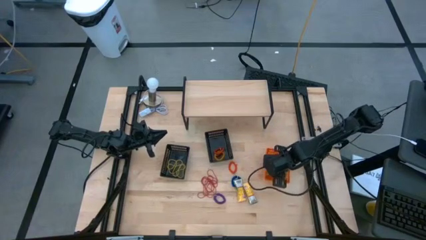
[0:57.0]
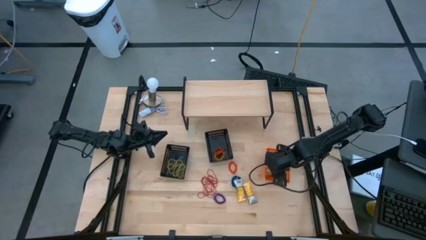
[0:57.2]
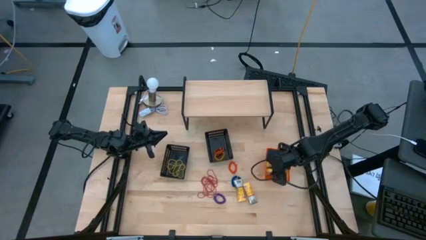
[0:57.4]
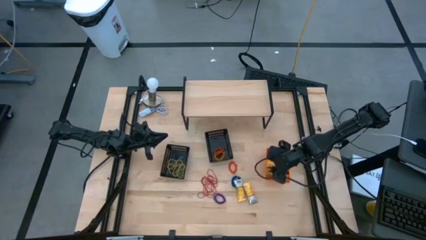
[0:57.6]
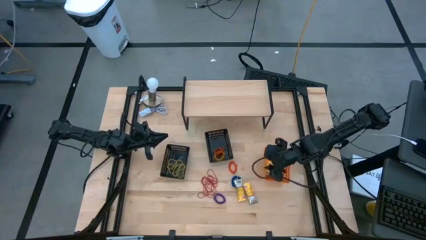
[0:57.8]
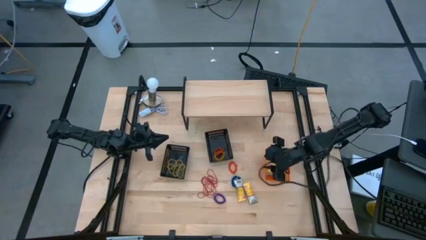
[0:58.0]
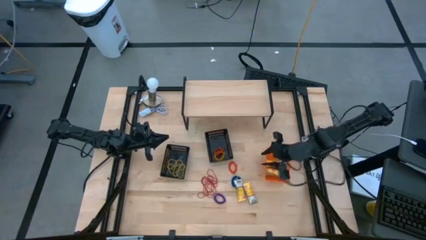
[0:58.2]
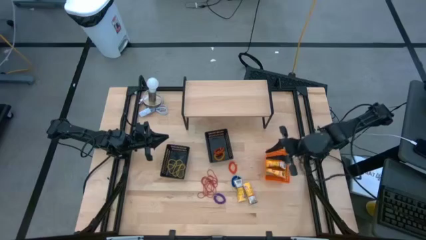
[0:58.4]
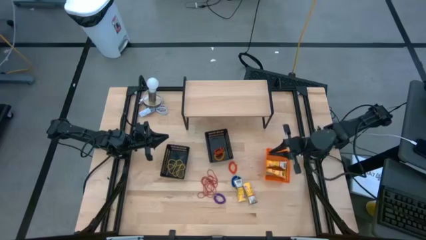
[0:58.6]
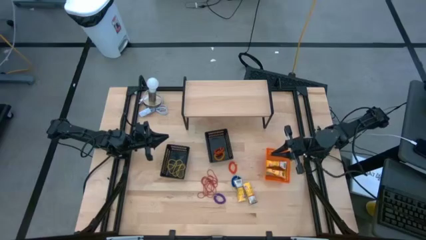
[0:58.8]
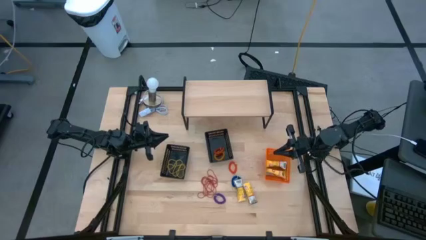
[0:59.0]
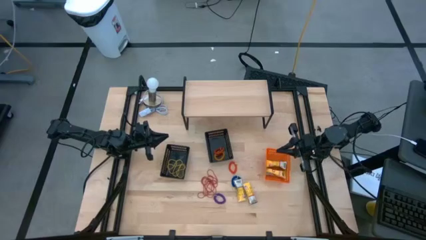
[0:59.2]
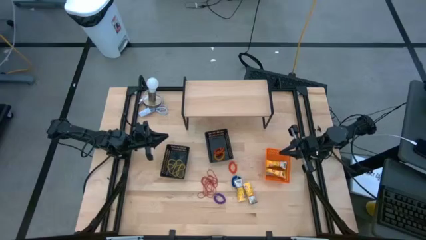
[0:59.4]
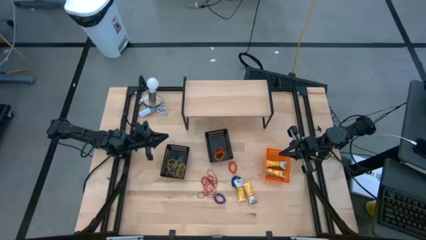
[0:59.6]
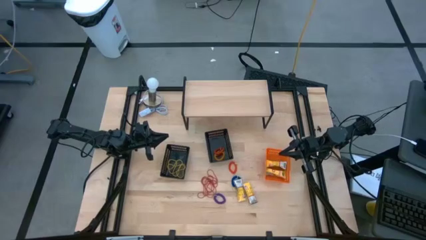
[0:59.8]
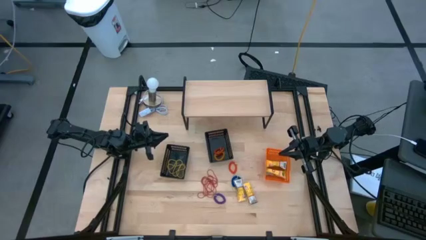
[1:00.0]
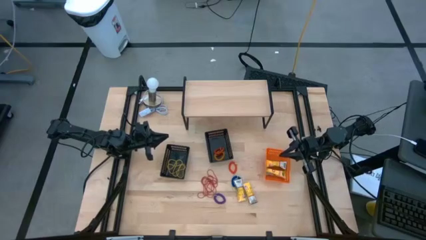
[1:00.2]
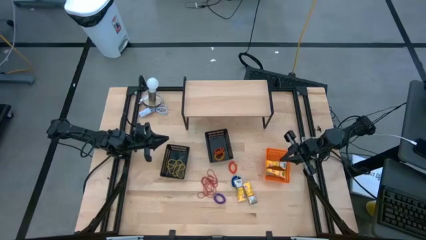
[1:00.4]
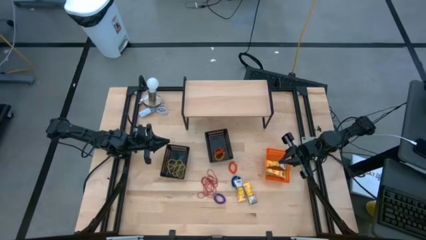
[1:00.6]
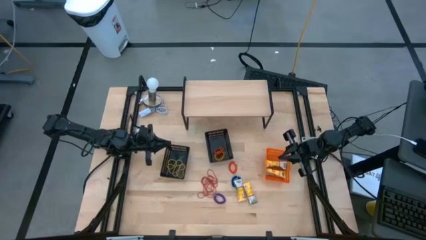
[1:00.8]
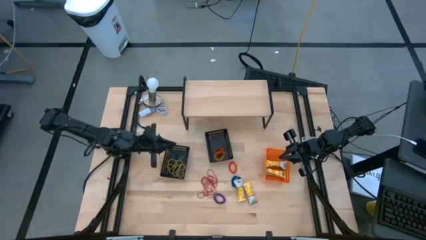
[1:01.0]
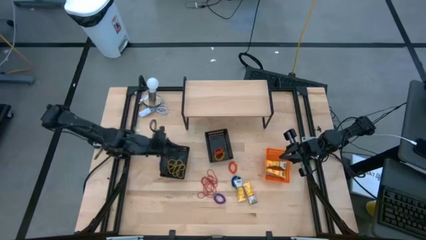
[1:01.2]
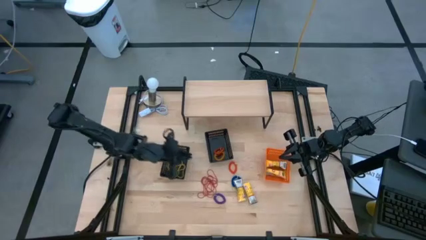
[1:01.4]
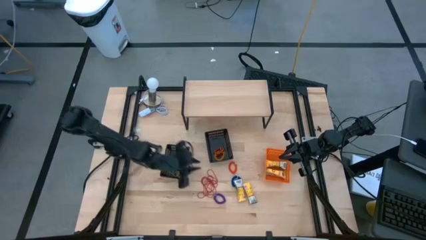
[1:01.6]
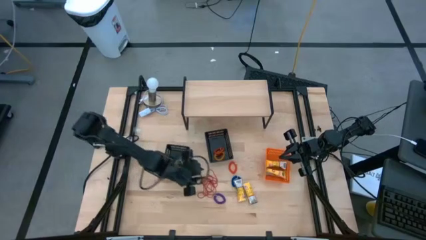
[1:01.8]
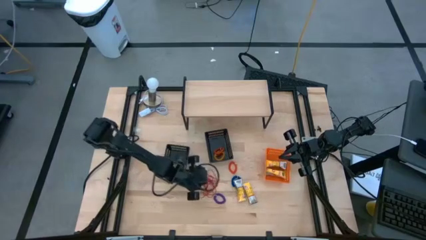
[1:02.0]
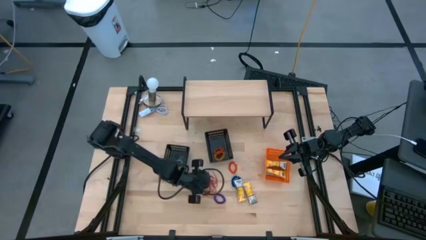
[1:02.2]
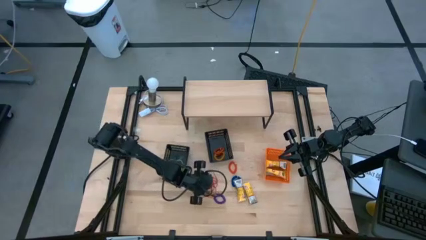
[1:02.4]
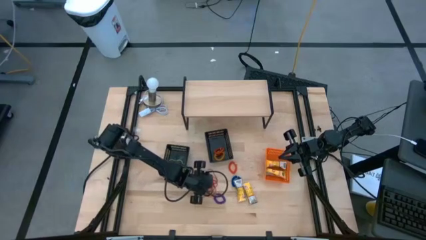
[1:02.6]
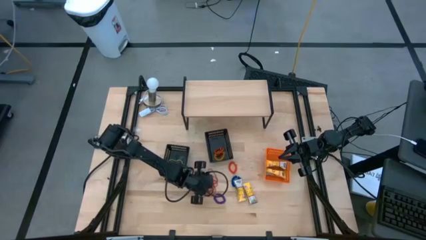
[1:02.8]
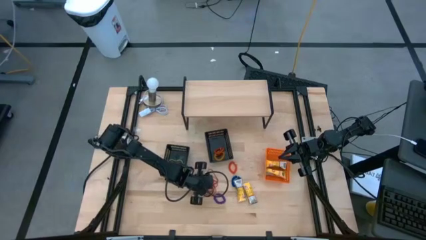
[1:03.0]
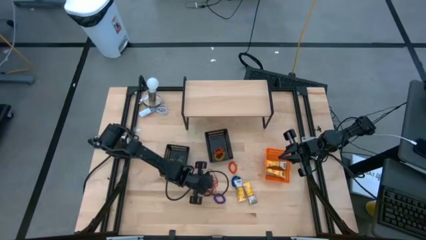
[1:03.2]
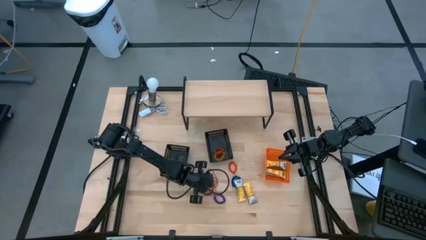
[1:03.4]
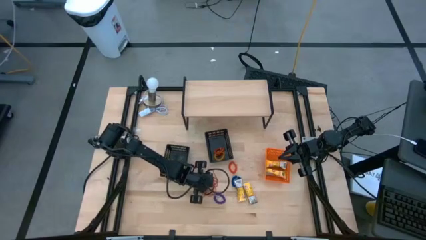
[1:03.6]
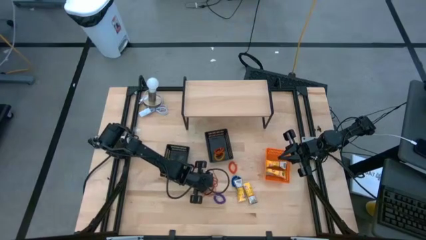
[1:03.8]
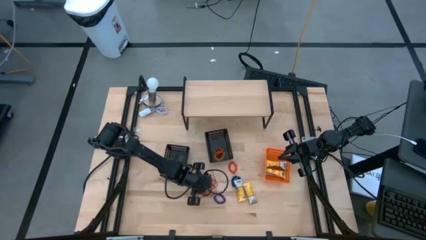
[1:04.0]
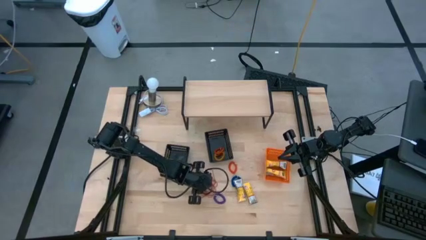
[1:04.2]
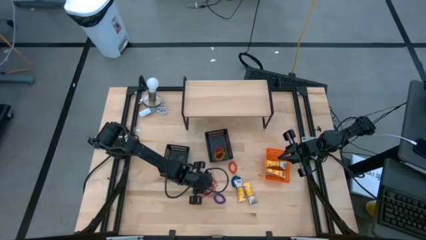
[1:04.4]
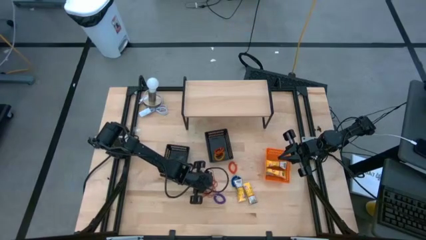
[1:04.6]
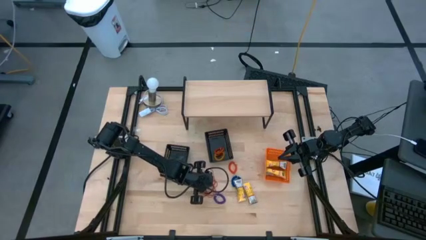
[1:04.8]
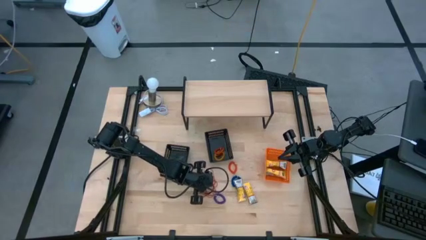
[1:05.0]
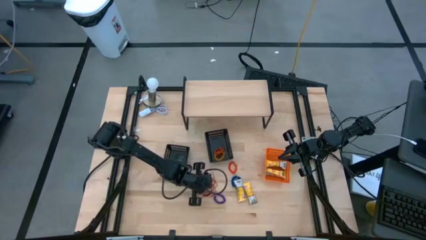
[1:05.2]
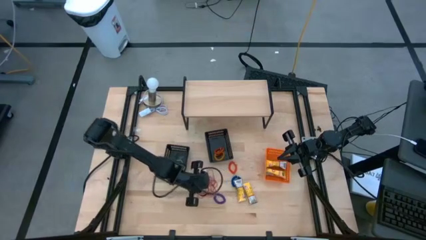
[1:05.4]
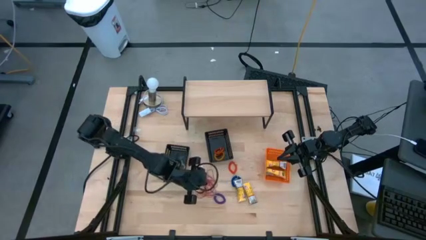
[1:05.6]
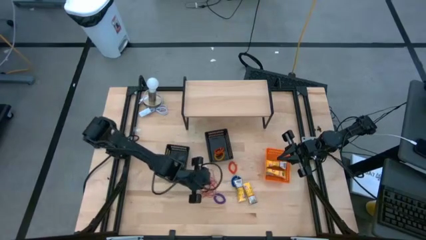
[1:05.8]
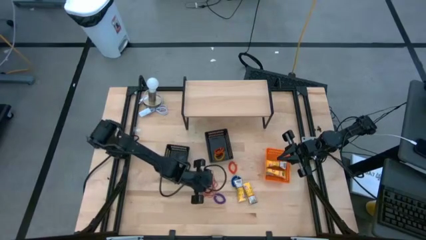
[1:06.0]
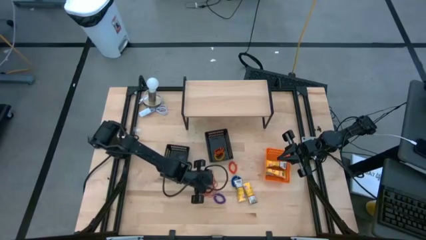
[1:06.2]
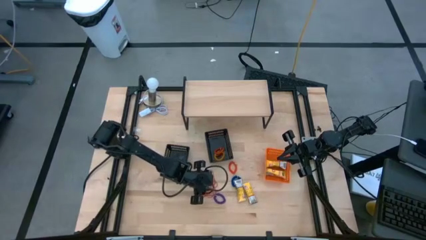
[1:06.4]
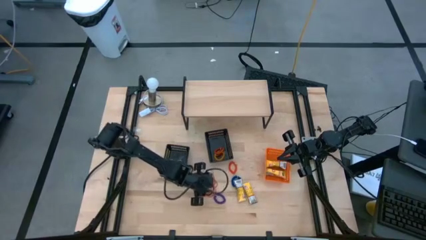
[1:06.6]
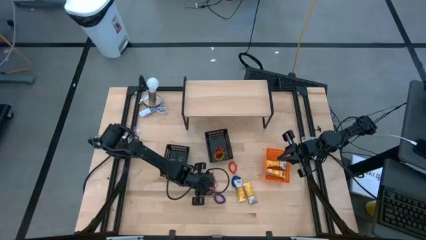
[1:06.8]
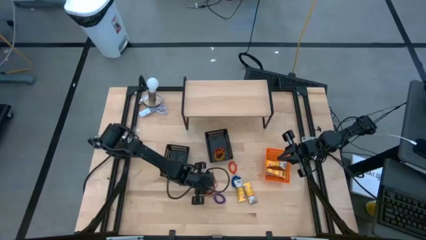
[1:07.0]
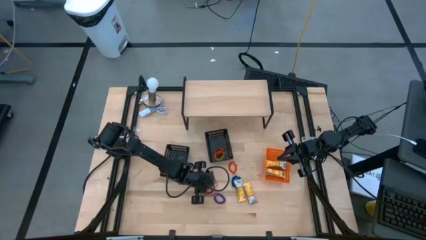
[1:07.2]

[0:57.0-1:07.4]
Task: Pick & Place Office Desk Supplies
Put the red rubber band into the left black bin

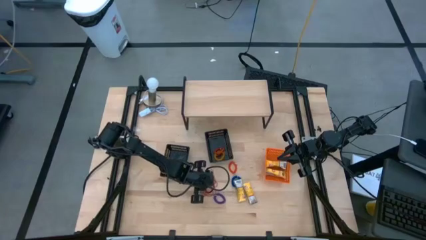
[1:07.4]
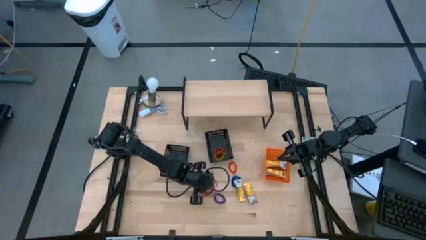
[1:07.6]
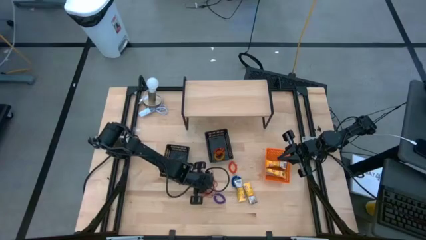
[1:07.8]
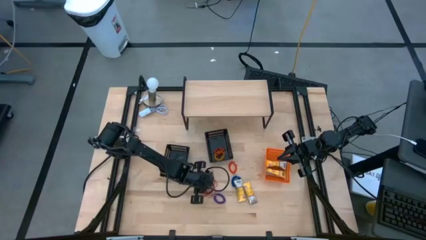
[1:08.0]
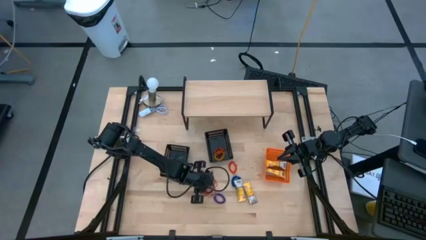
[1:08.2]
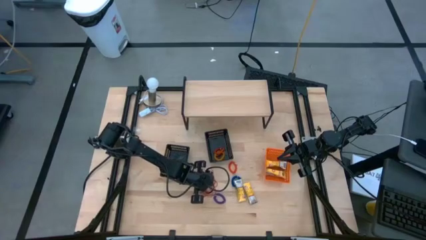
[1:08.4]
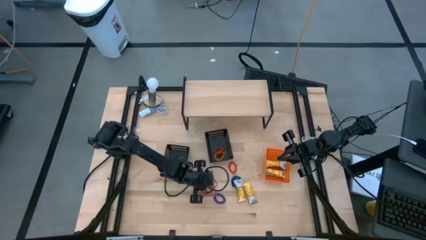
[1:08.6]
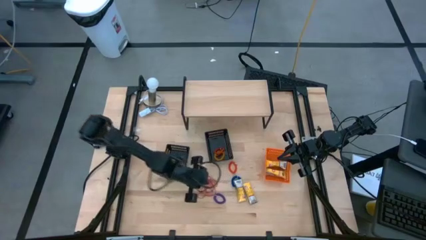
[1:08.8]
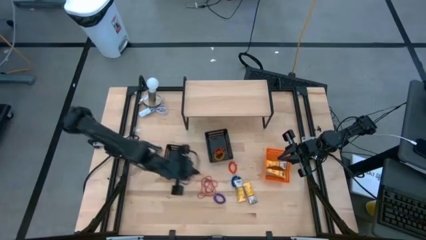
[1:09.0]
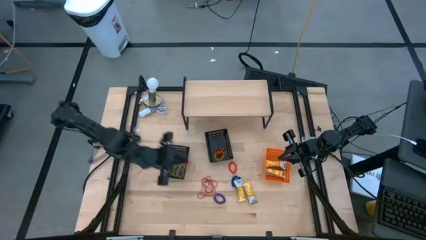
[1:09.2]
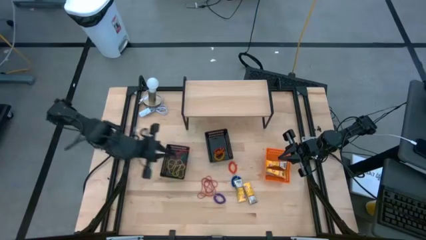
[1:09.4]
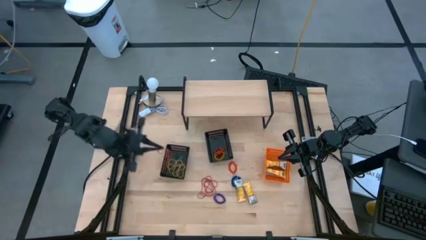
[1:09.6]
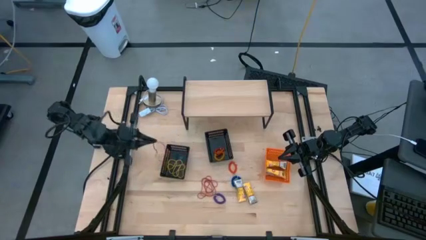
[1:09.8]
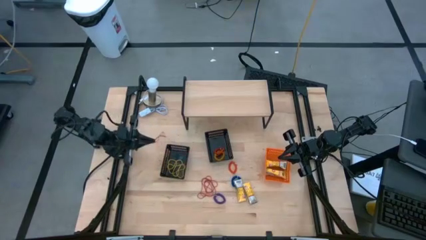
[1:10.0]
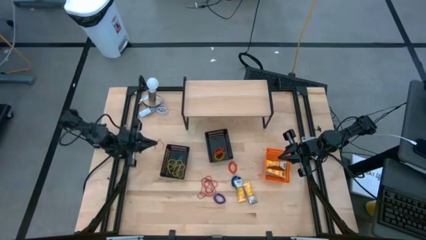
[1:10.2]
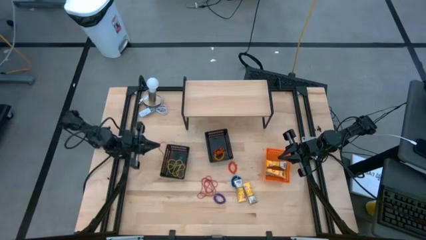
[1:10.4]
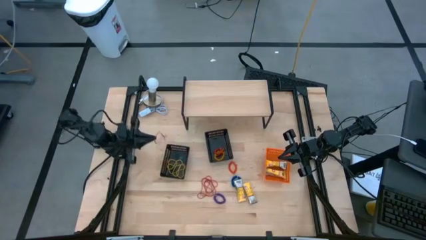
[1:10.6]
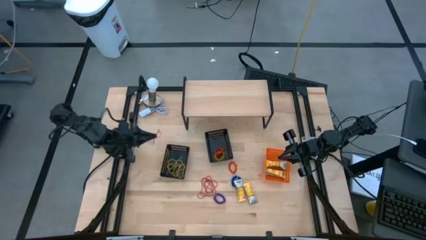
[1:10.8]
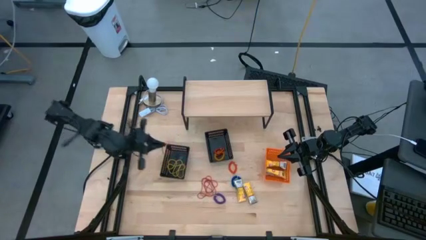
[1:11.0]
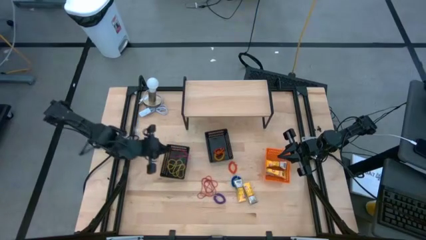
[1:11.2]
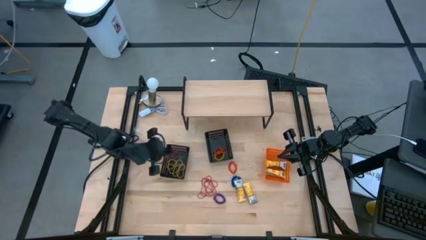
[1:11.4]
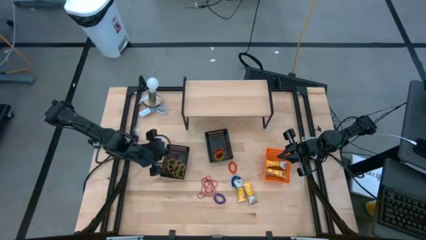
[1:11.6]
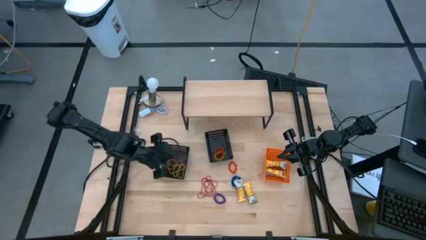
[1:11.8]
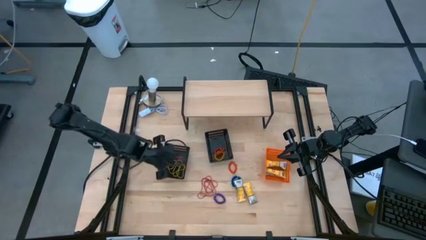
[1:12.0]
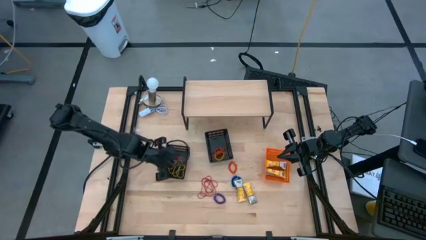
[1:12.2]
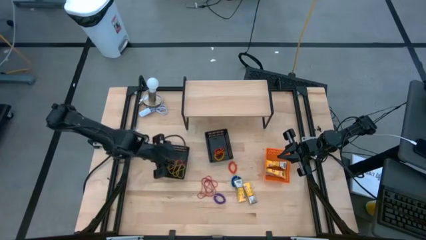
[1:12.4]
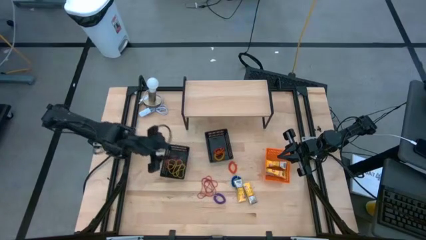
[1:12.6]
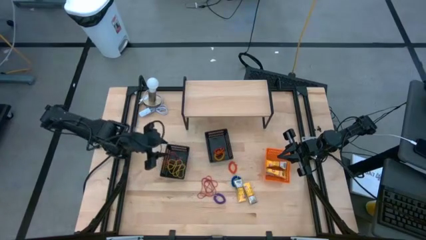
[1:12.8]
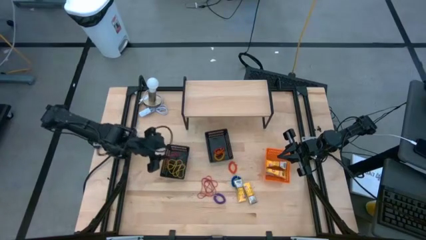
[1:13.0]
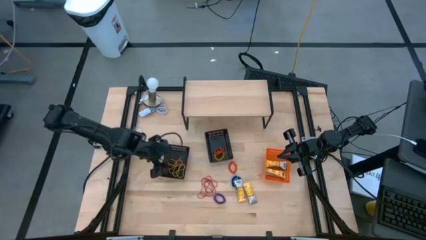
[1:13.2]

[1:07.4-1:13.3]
Put the red rubber band into the left black bin
